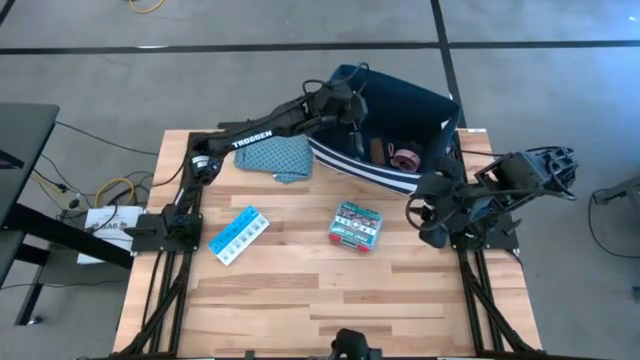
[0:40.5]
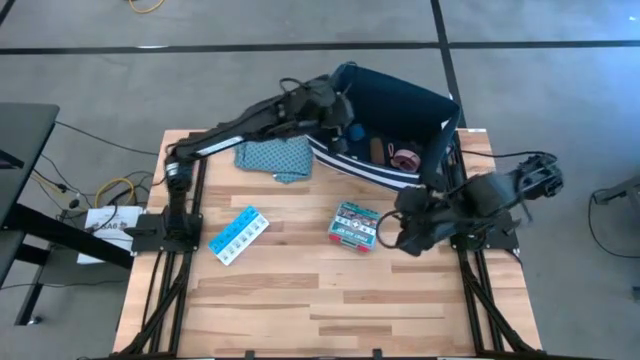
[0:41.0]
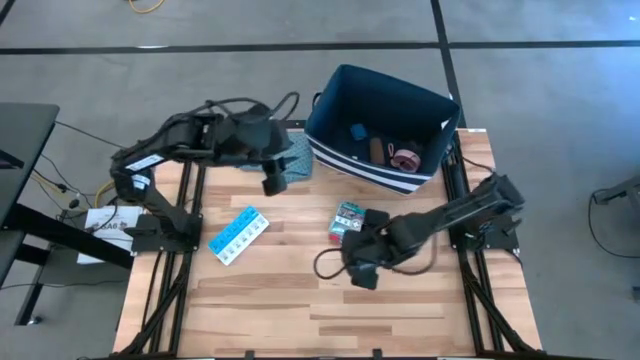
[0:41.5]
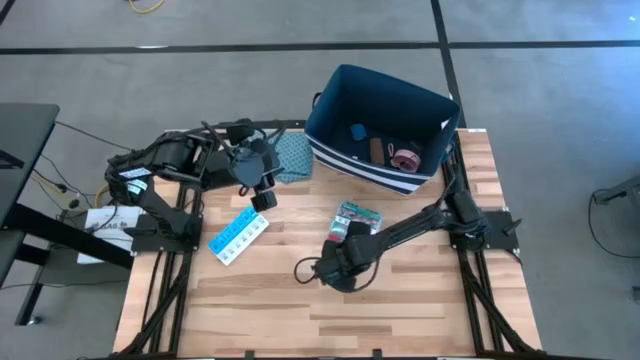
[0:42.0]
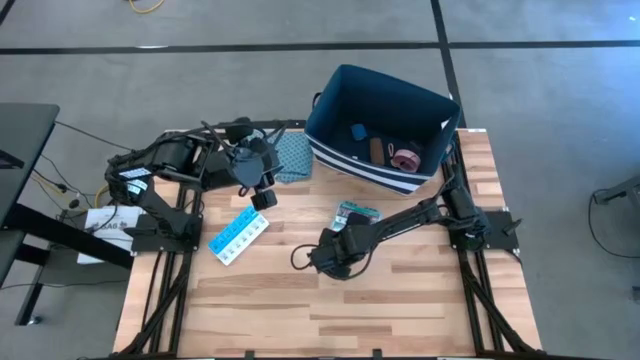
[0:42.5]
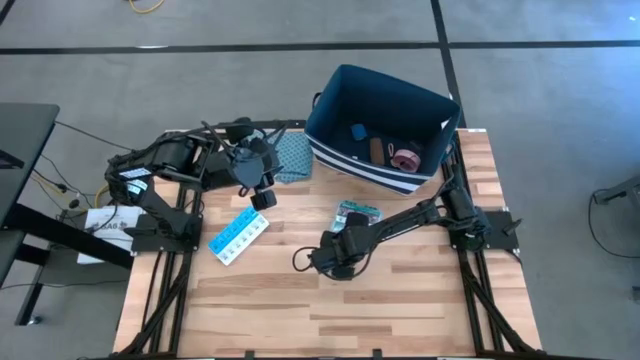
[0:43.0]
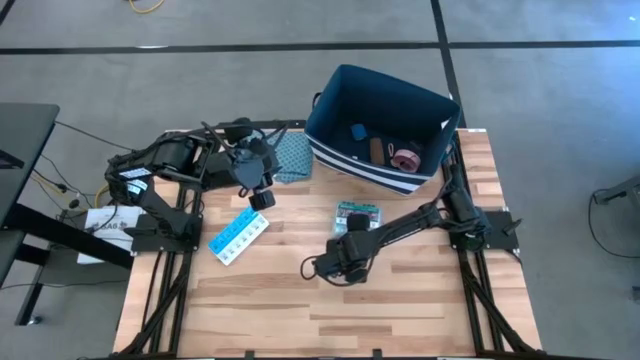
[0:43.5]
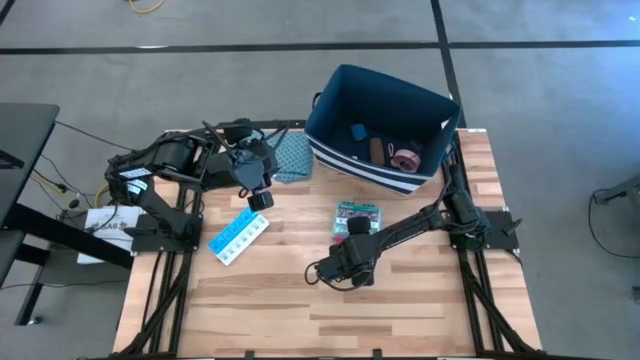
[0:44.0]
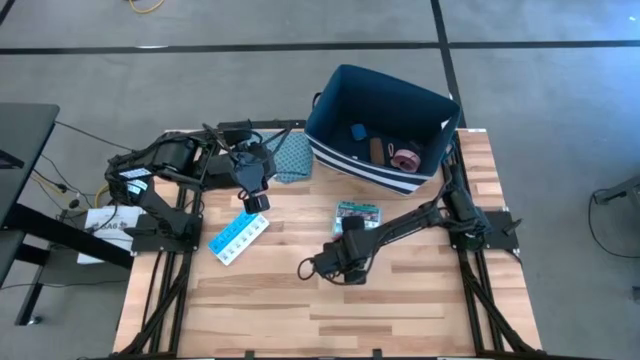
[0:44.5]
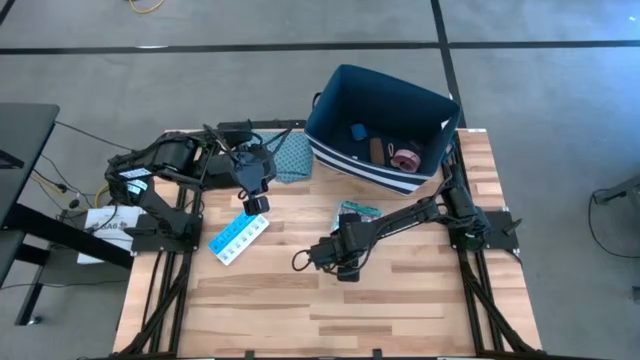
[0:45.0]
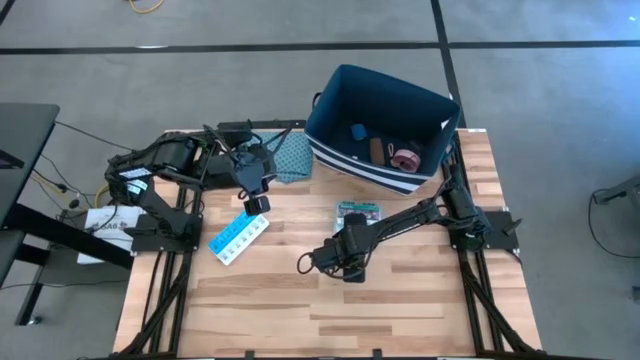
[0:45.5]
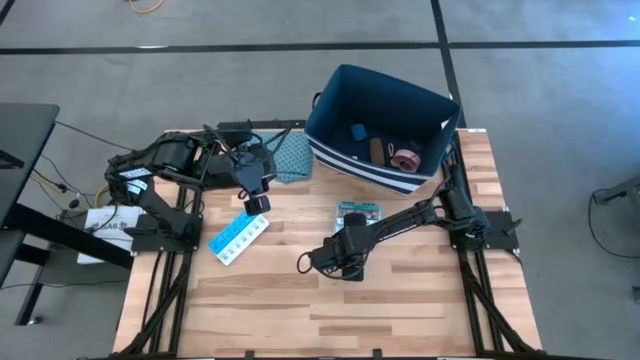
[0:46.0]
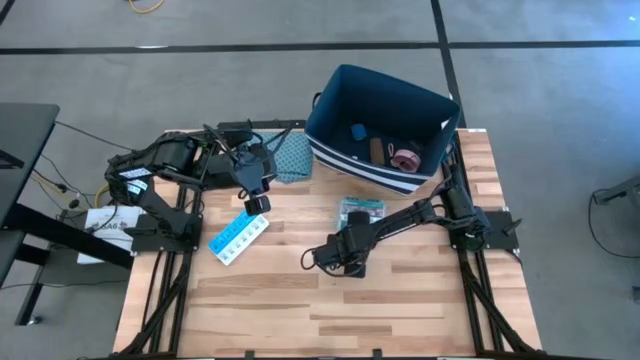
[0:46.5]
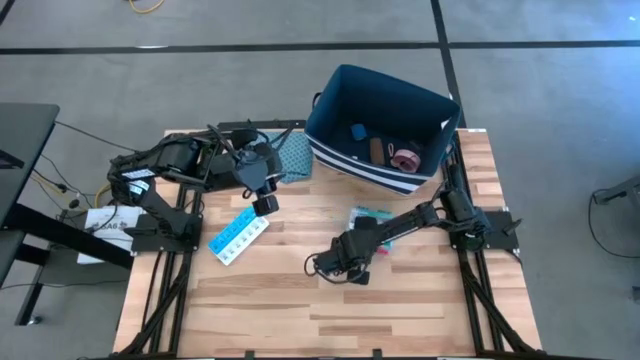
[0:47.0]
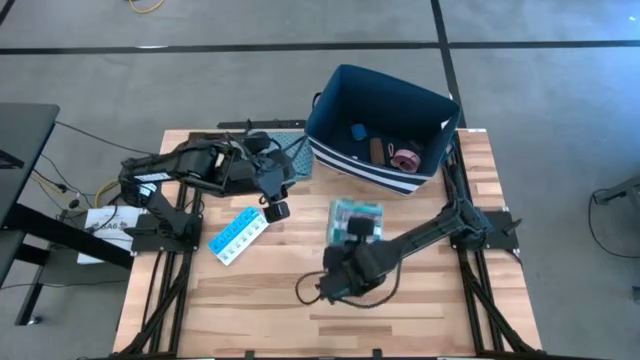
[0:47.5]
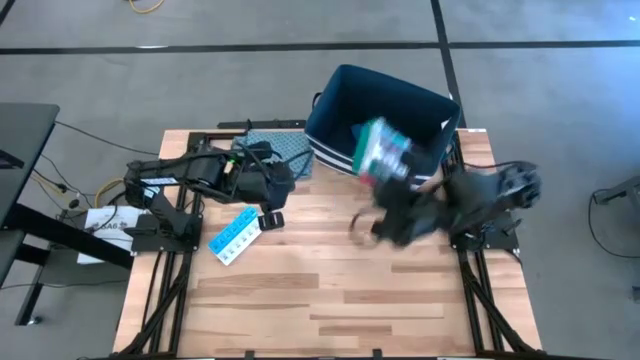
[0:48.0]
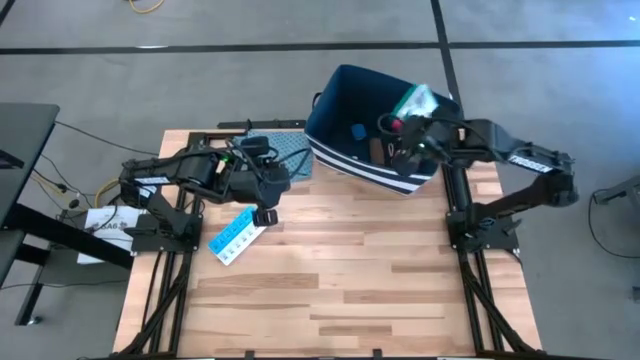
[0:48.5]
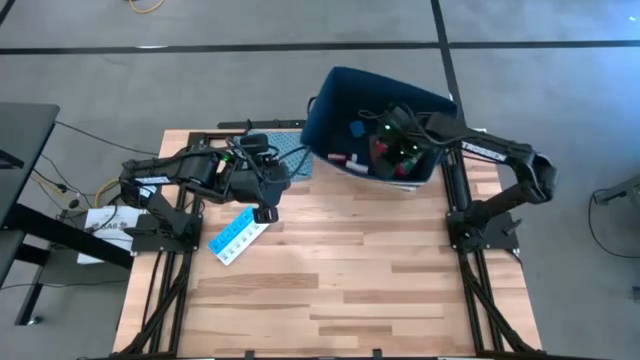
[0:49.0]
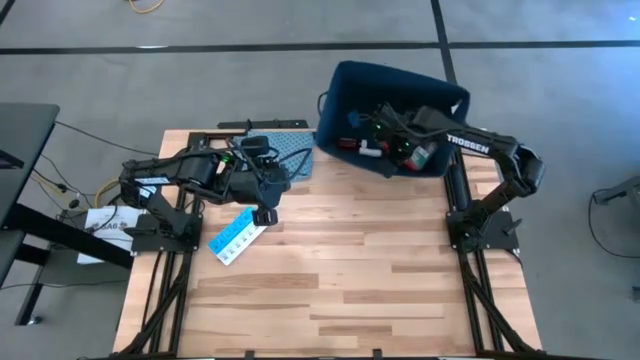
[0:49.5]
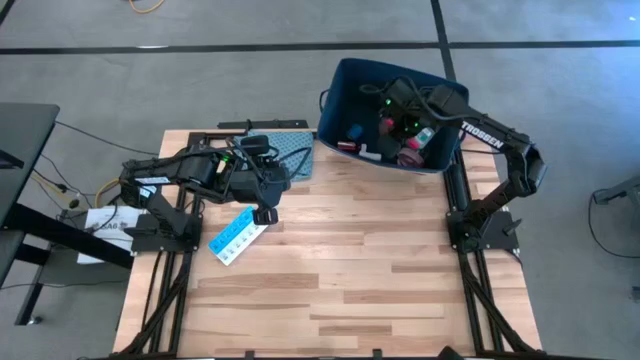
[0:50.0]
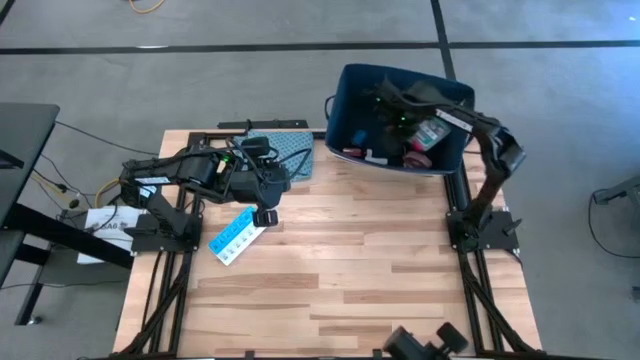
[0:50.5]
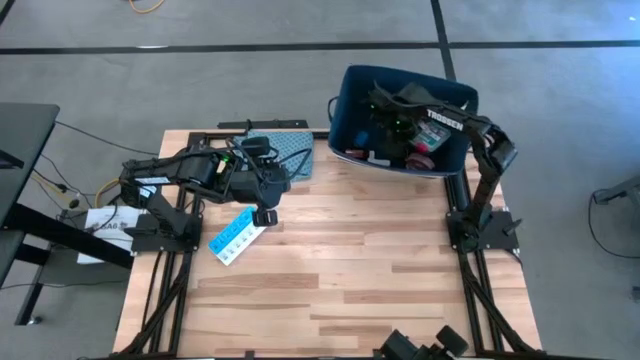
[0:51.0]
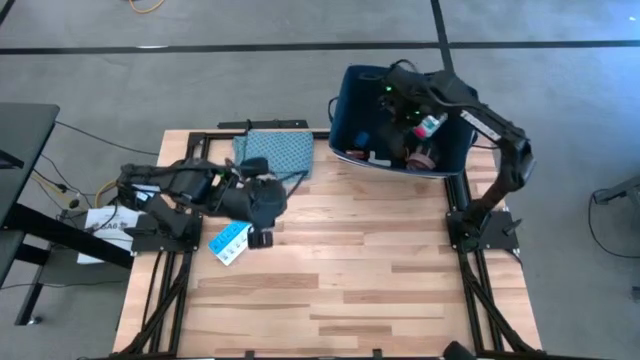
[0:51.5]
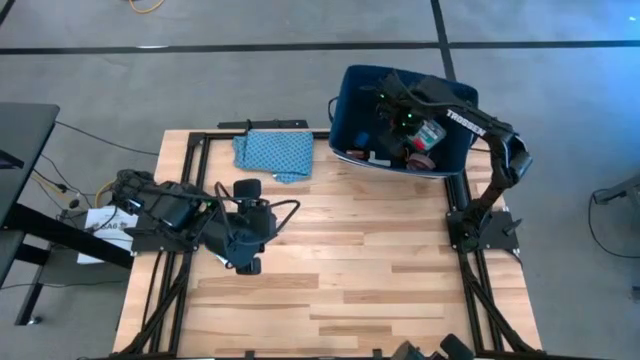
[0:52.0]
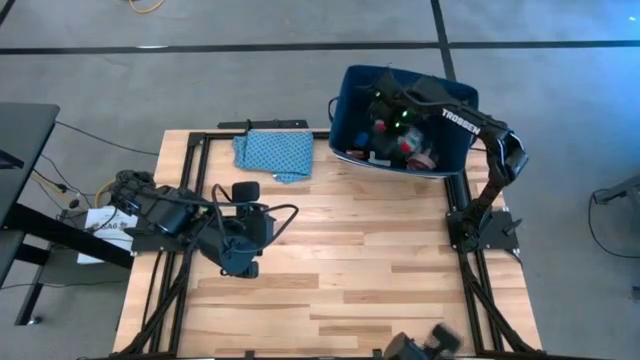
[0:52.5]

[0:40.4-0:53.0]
Task: Pick & place medical supplies in basket/bin
Put the blue first aid kit into the blue basket

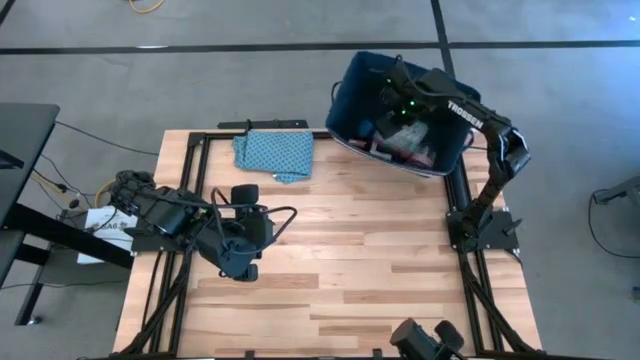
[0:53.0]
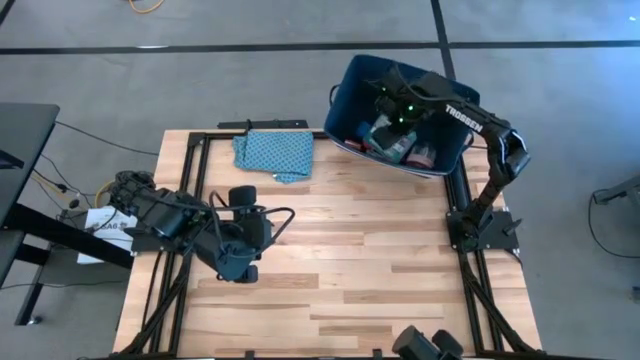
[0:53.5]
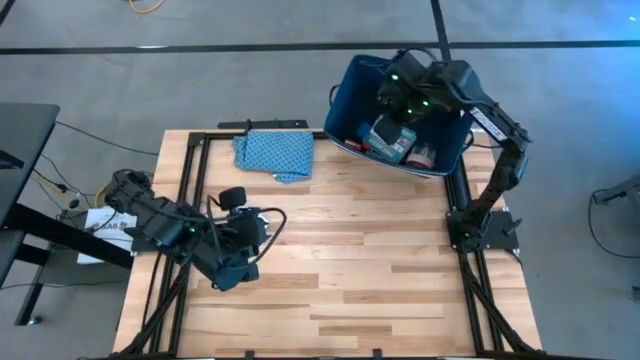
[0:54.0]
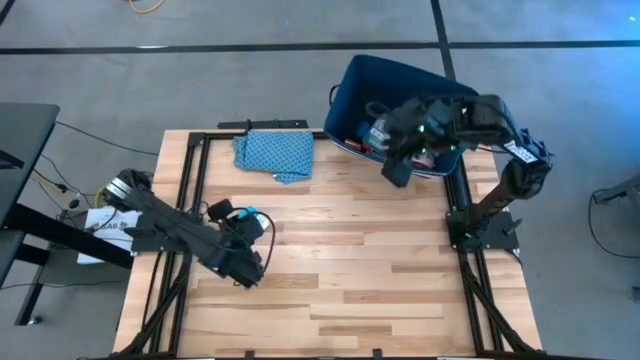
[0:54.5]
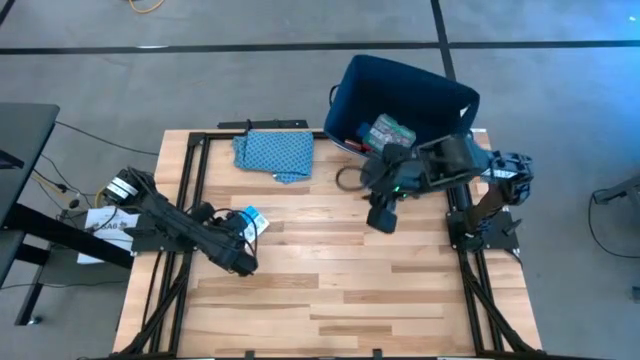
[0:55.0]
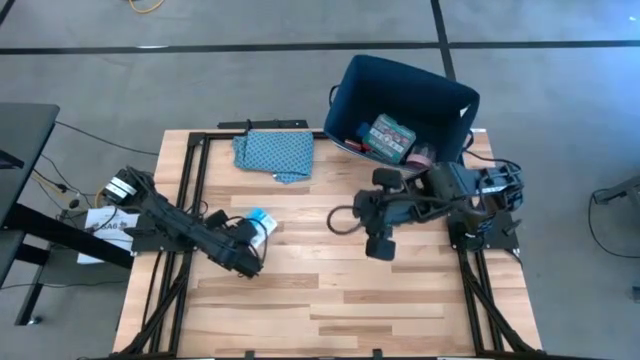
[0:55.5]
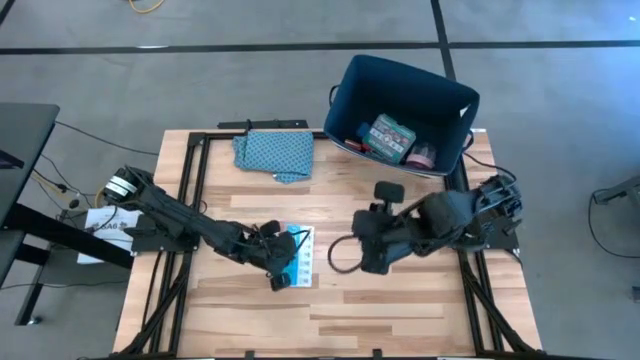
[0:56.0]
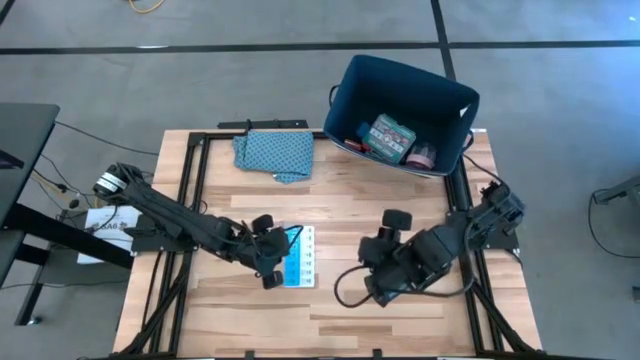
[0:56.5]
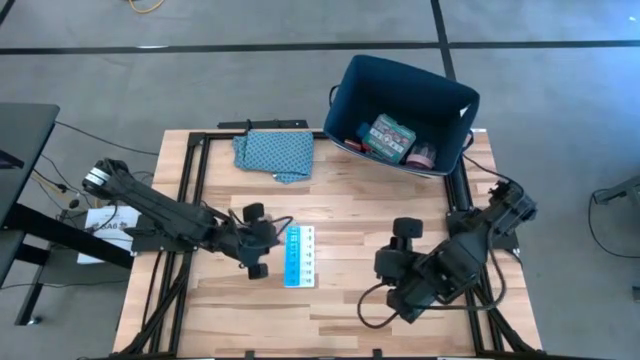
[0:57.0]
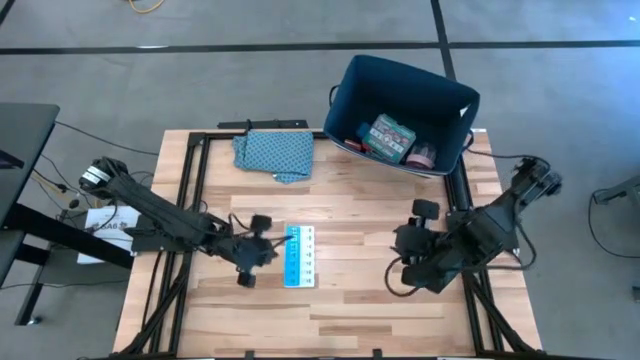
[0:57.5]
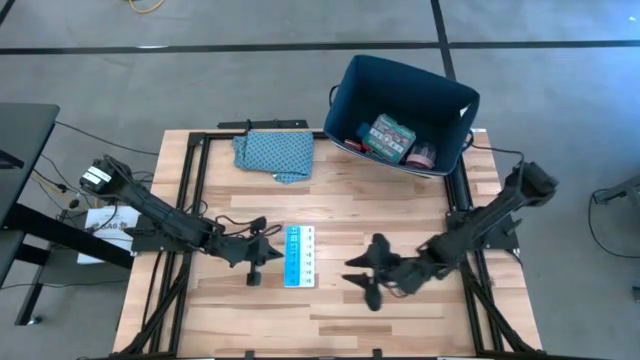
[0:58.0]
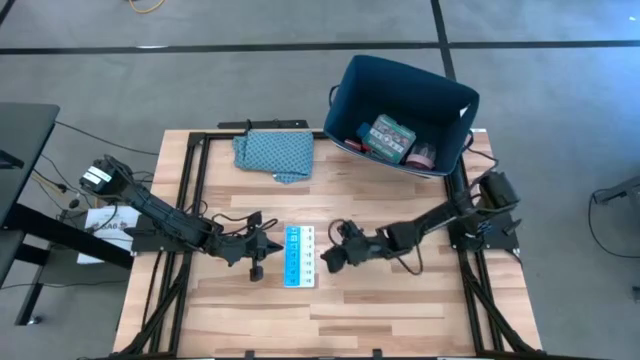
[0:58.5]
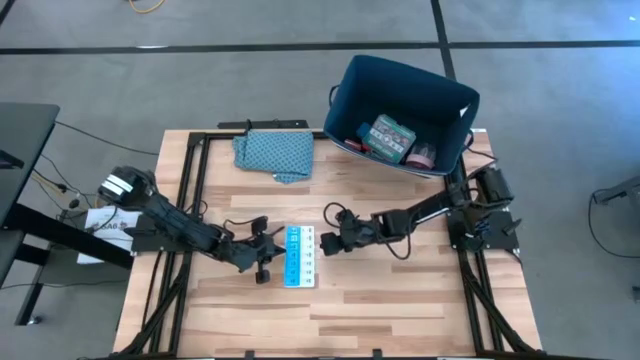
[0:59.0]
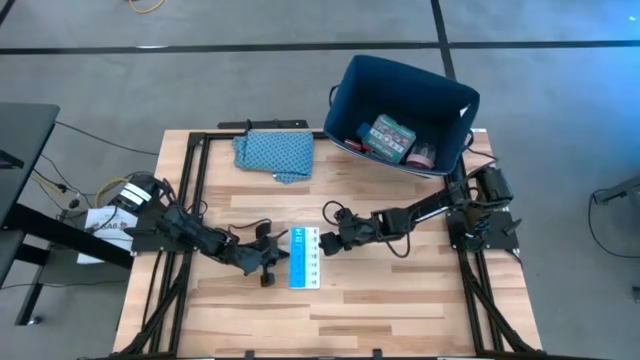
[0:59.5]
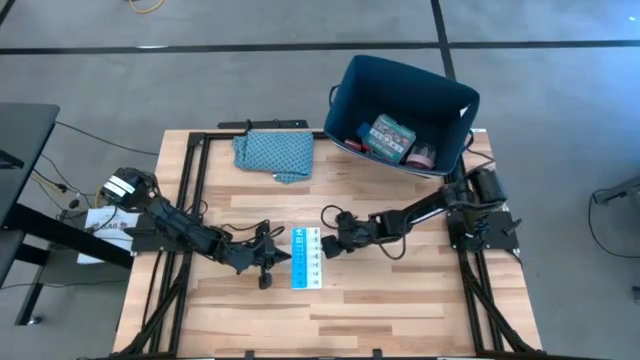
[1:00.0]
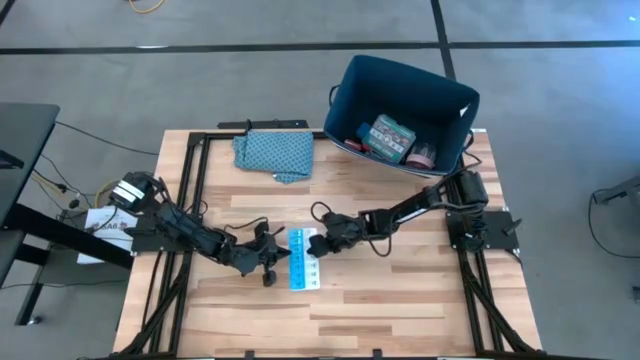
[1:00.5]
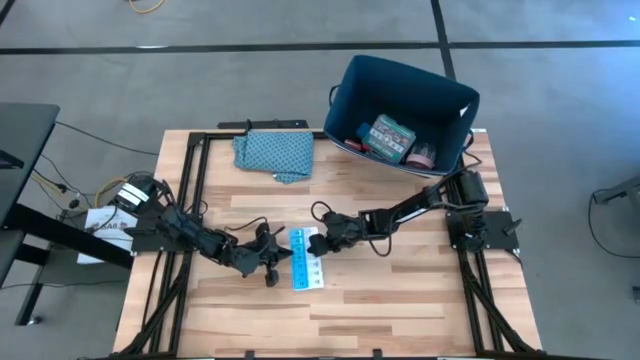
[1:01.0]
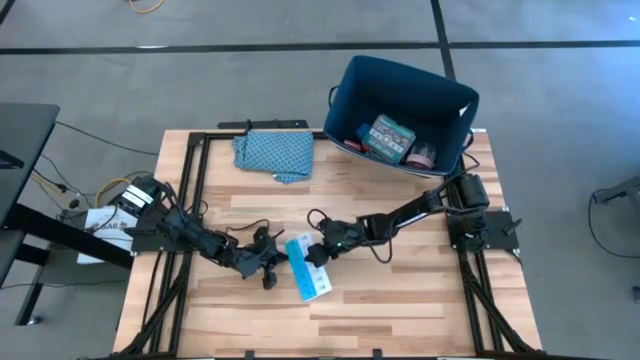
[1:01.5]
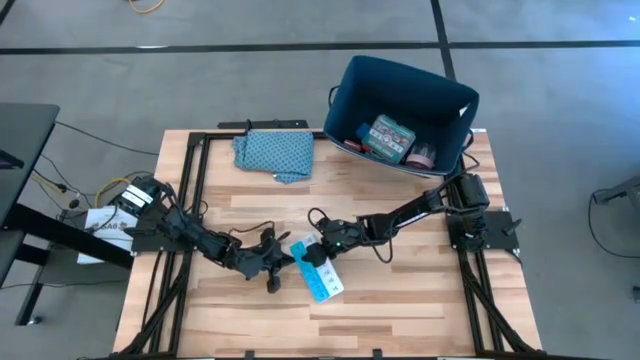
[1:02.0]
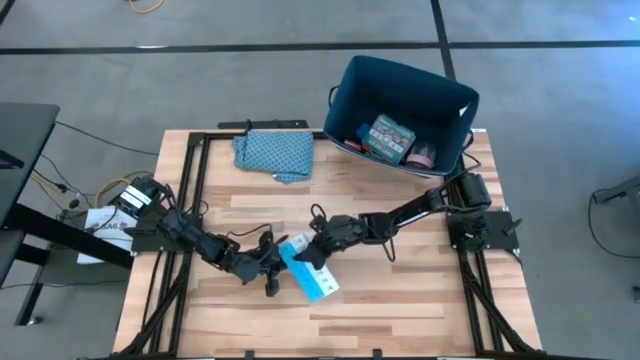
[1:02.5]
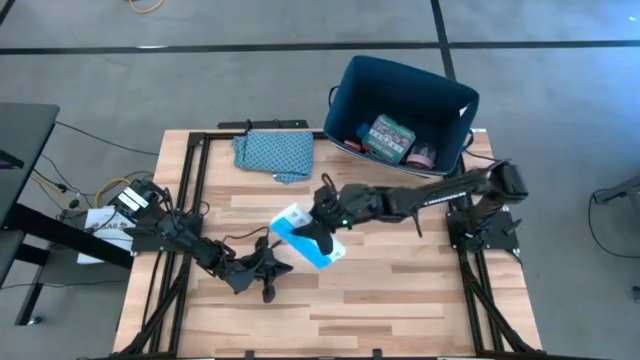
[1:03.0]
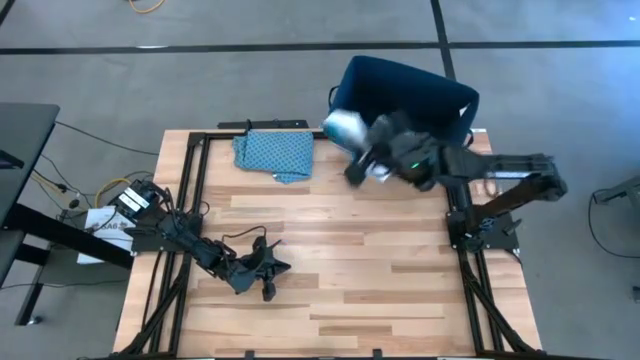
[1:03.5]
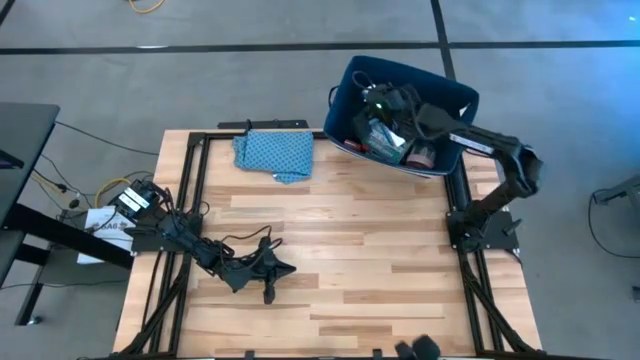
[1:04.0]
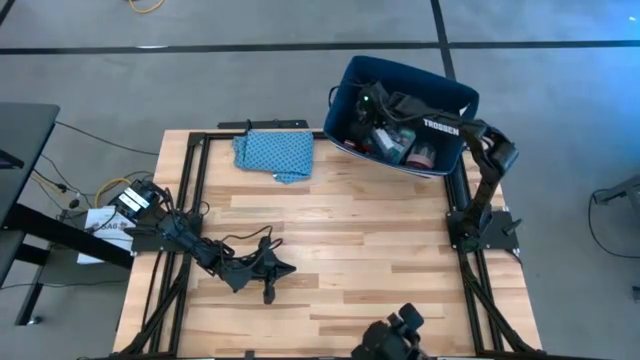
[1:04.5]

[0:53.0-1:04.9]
Put the blue medicine organizer into the blue basket
